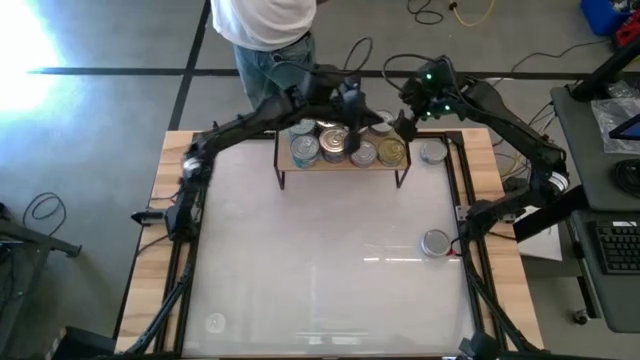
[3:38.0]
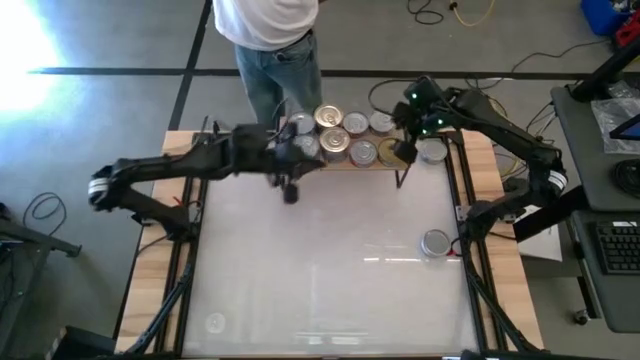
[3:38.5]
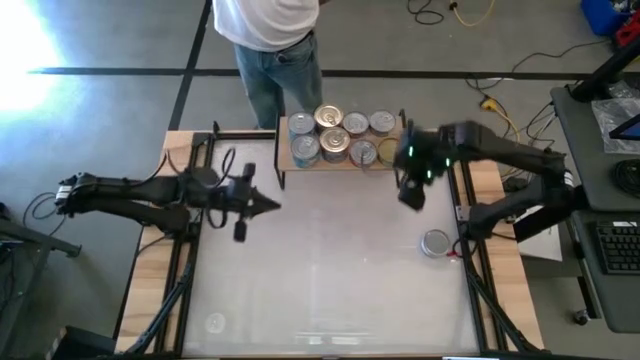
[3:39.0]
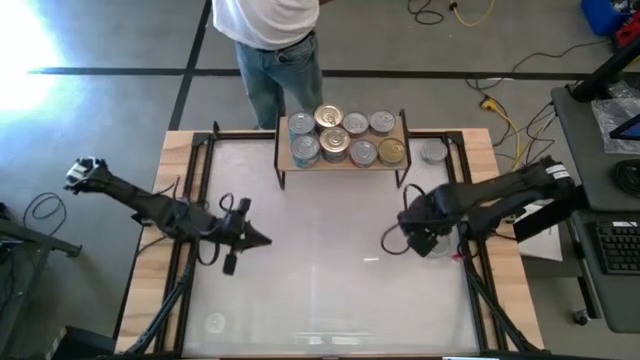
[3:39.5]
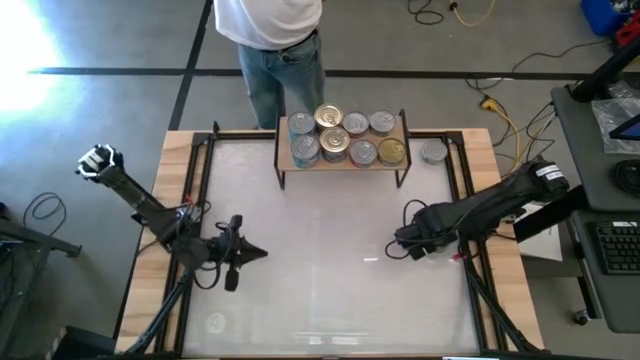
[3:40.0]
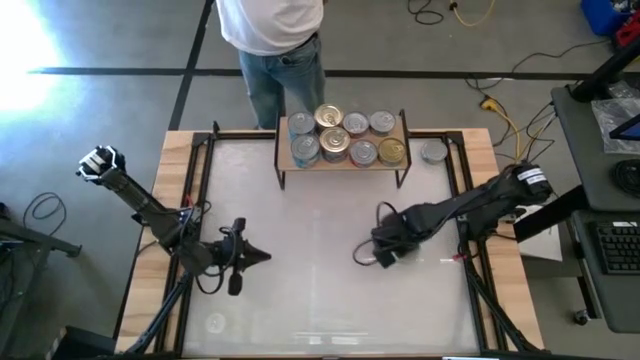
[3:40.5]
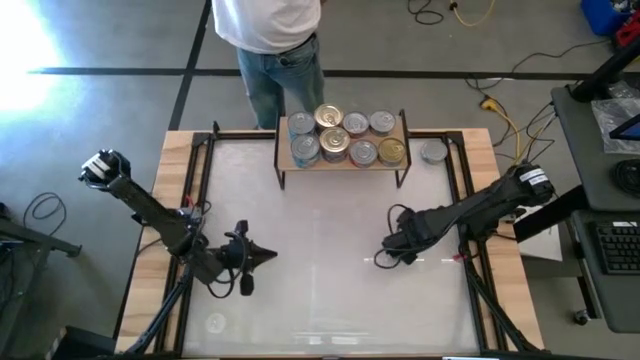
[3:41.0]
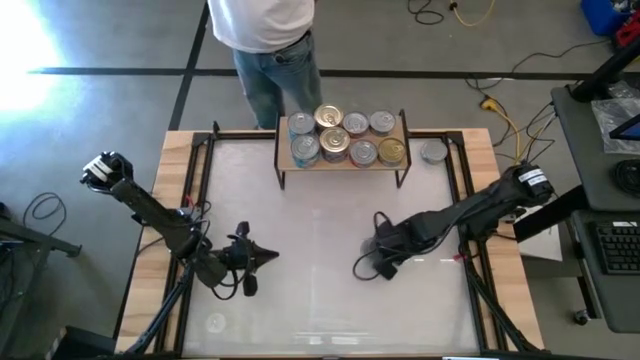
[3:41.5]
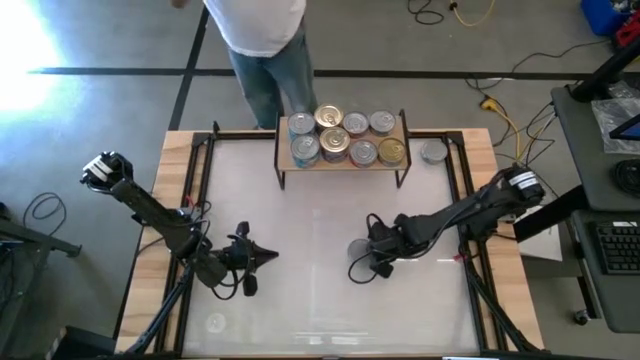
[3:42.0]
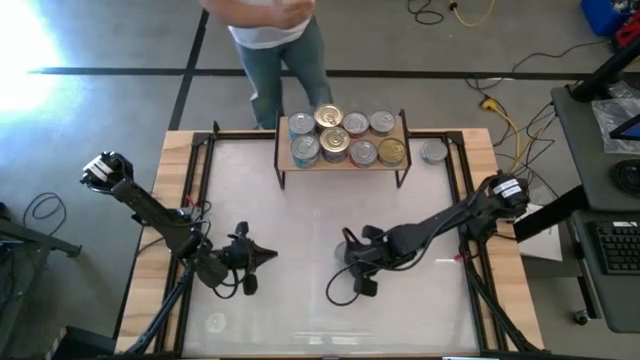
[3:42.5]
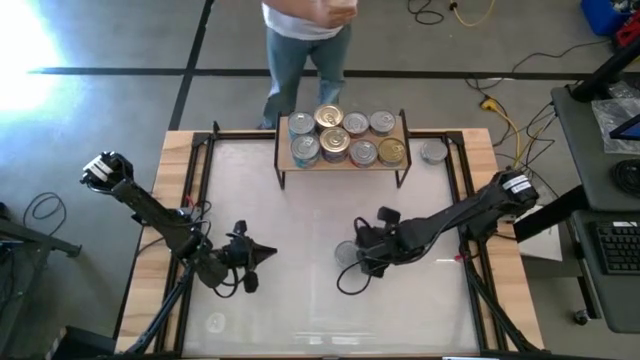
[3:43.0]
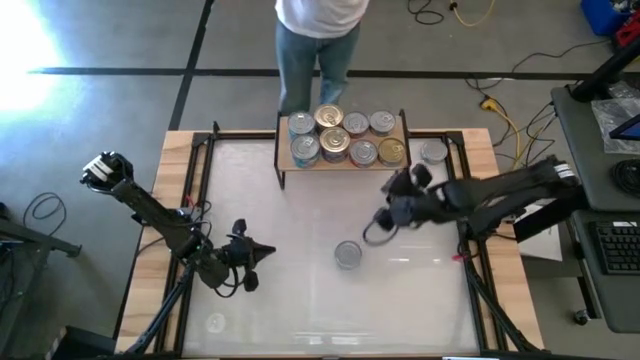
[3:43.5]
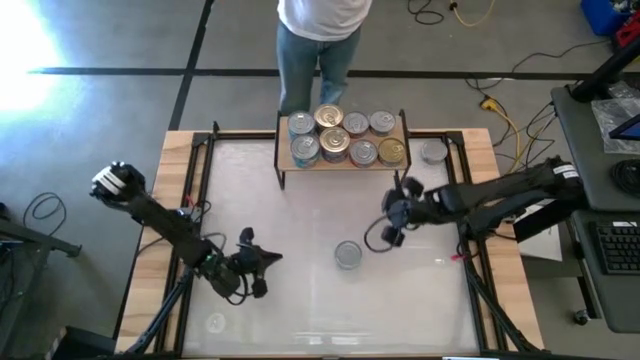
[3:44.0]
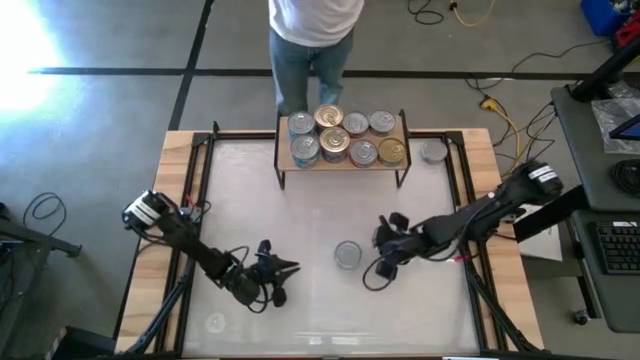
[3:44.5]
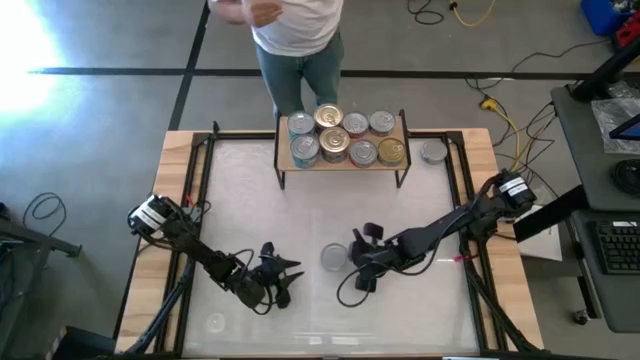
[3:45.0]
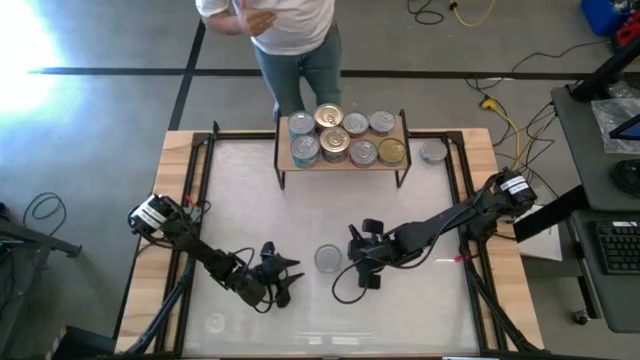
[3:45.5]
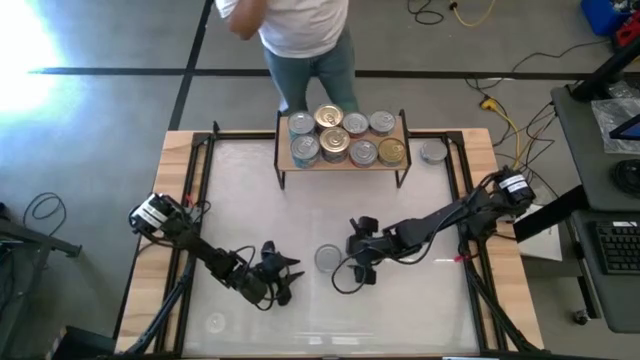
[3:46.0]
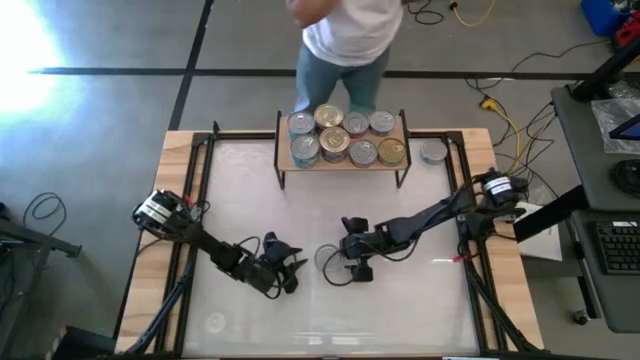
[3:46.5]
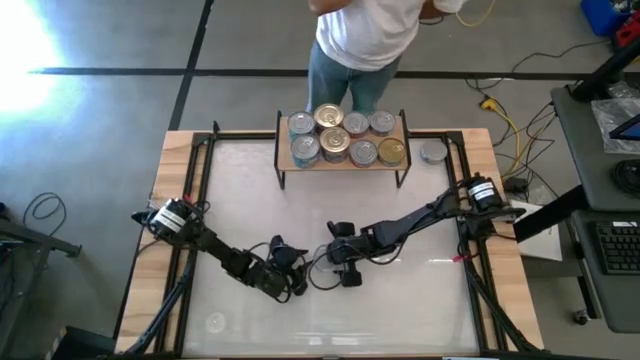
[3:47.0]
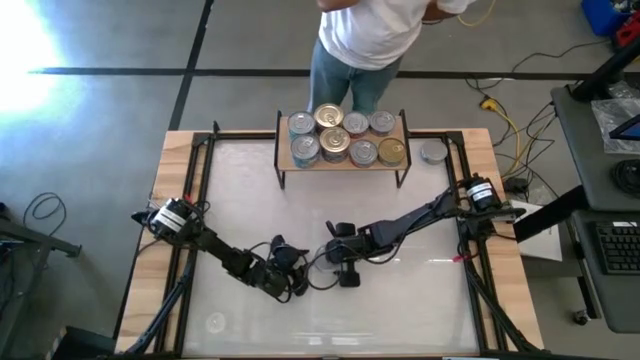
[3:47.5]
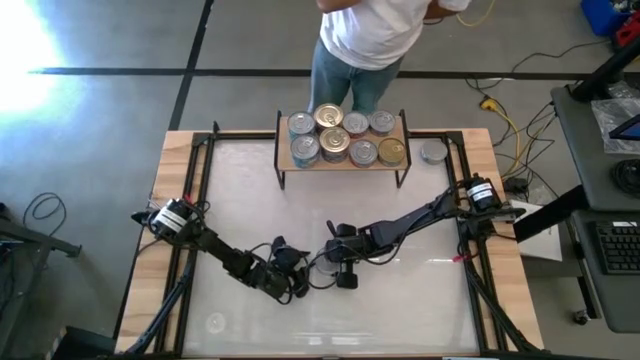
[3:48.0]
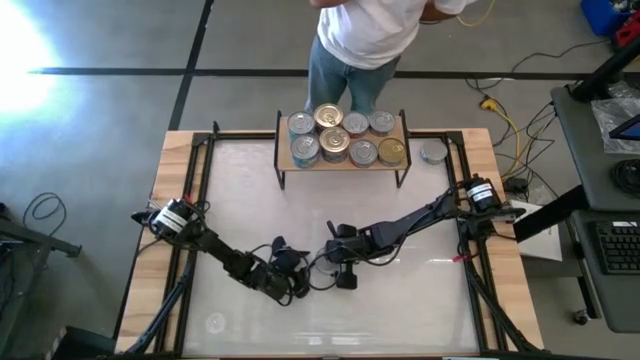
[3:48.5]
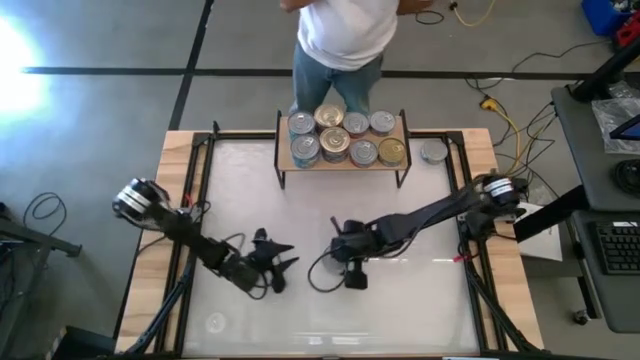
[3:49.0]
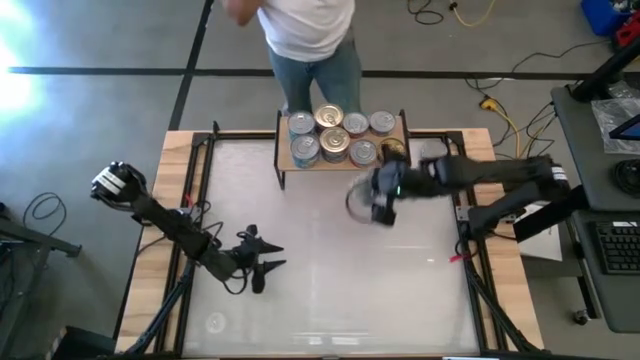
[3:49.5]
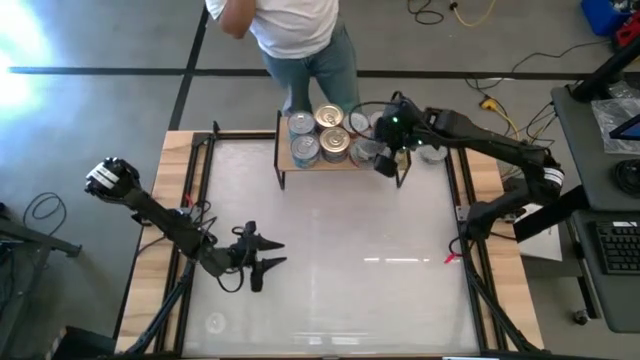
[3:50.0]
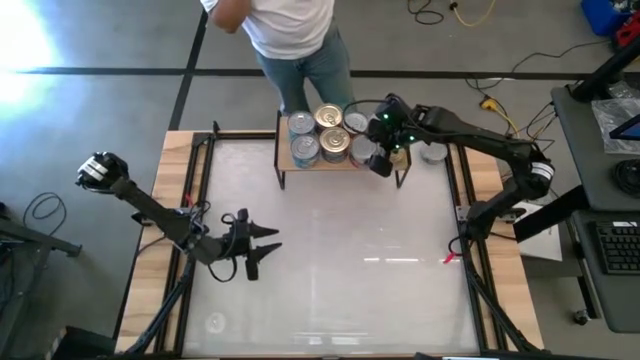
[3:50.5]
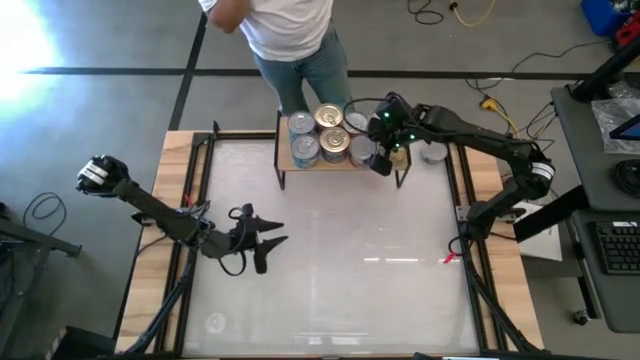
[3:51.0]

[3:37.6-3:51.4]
Task: Stack canned seafood by type on shelf
Stack the bottom green tuna can on top of the red tuna can on the shelf

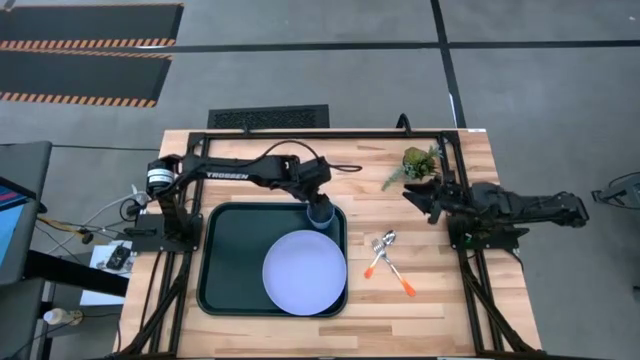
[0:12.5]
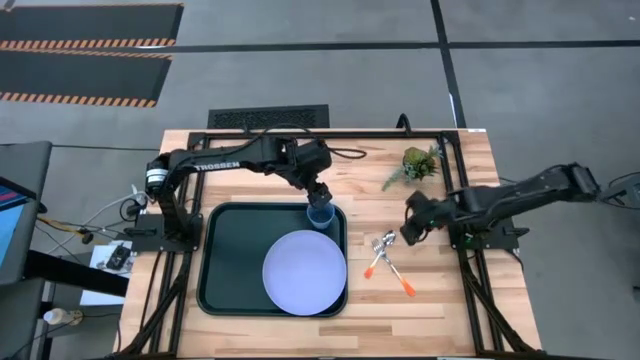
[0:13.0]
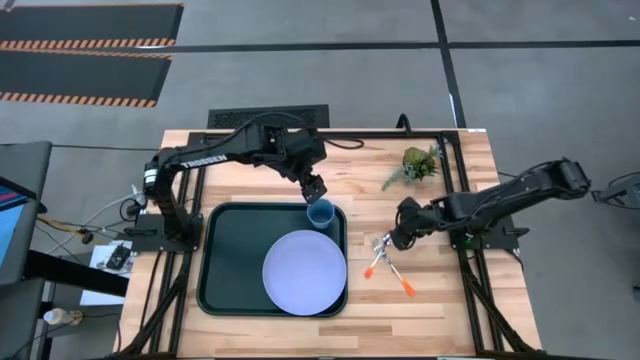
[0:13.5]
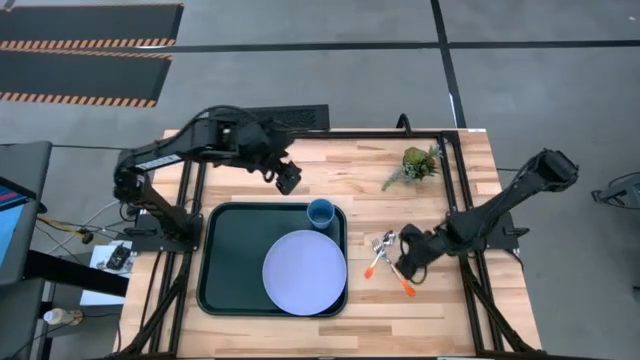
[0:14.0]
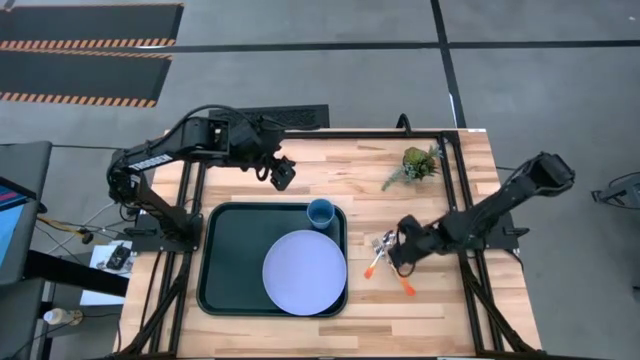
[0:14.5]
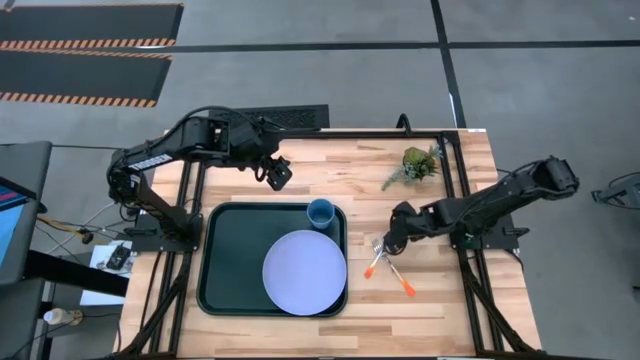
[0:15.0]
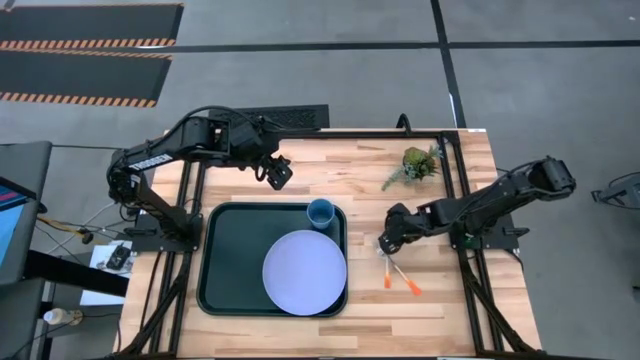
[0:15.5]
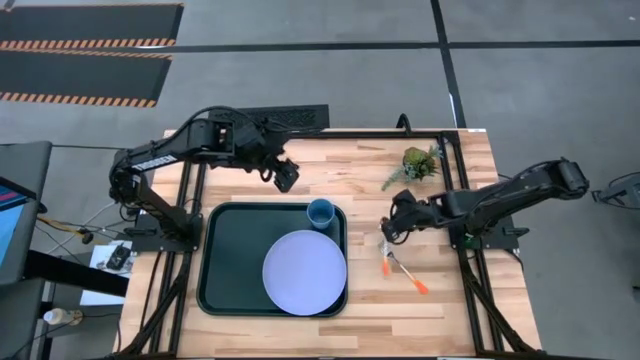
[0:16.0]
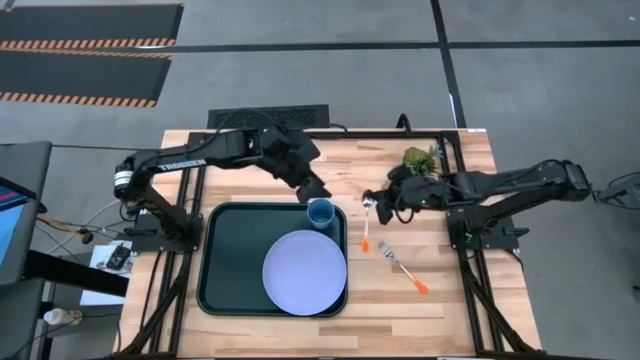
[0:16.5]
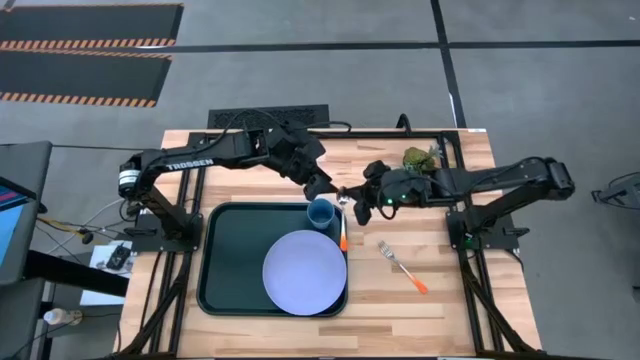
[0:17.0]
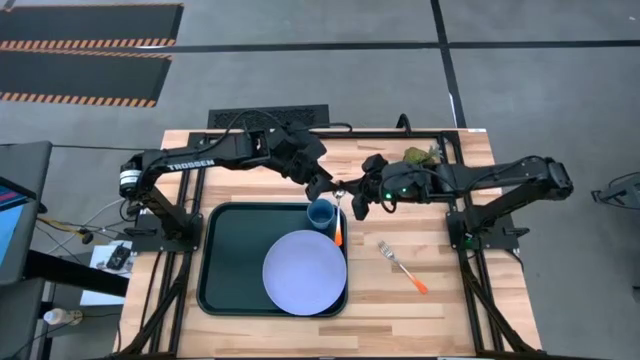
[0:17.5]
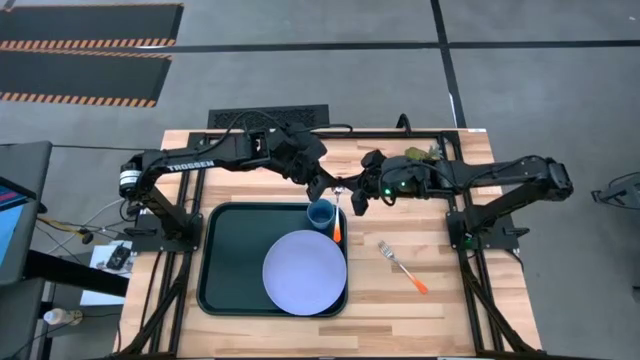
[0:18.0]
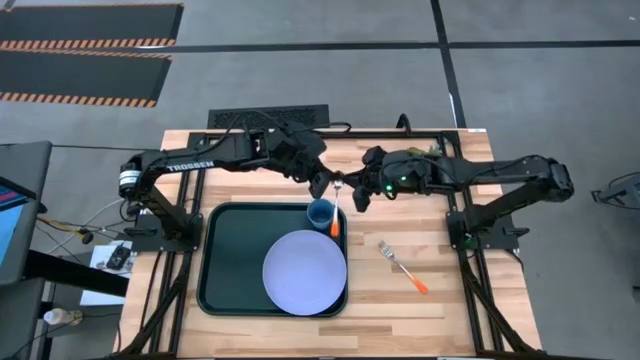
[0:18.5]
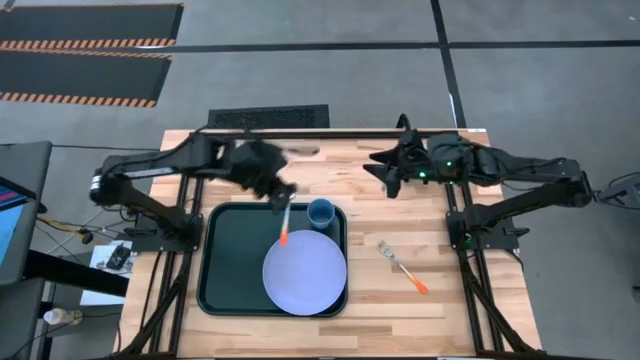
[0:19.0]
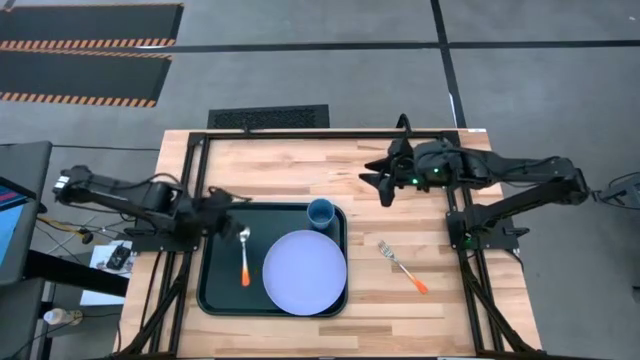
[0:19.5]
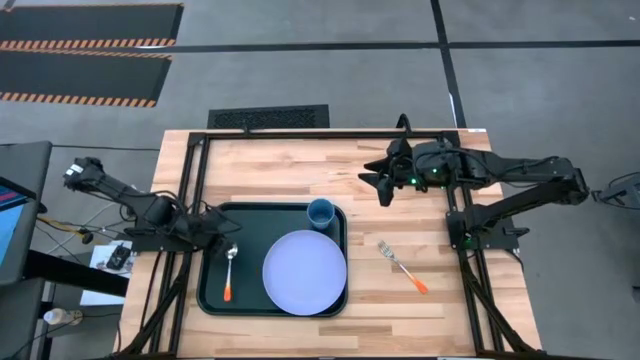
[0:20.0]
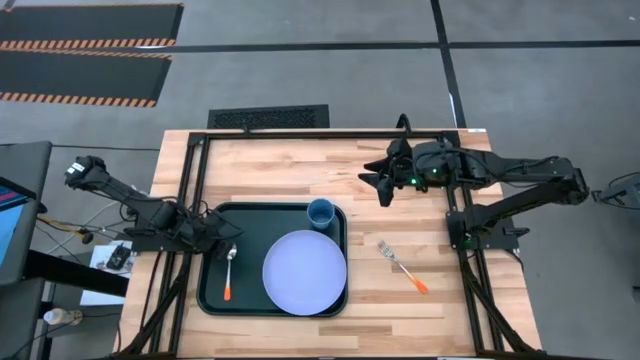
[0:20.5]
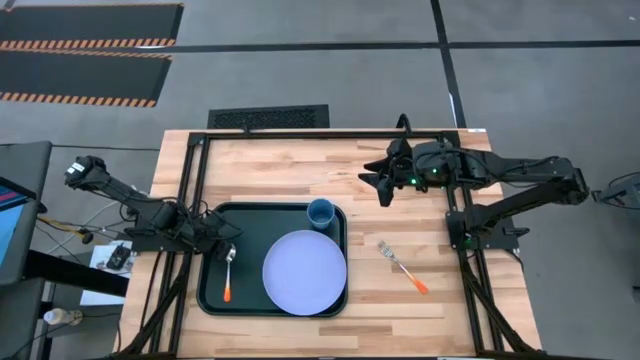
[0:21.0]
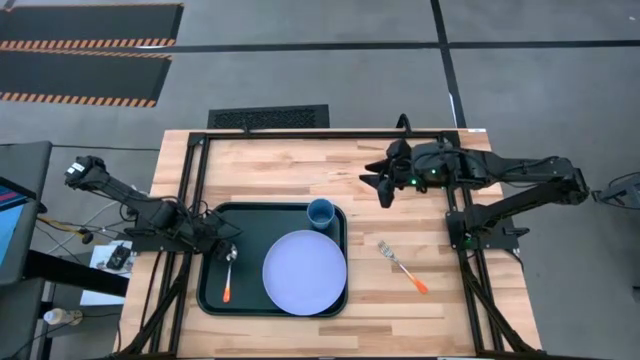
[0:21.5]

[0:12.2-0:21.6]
Task: Pick and place plate/cup/fork/spoon on tray
Put the orange spoon on the black tray to the left of the purple plate
